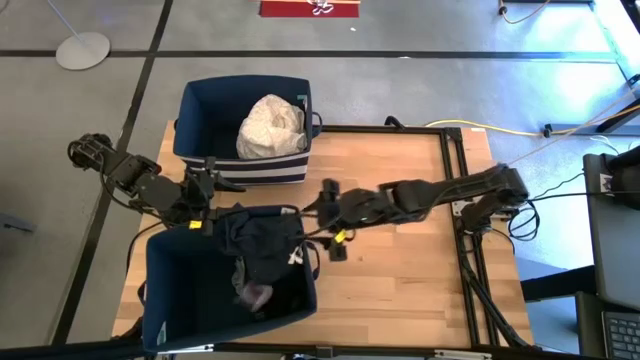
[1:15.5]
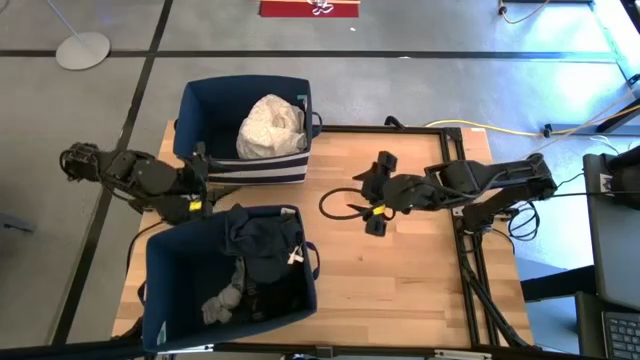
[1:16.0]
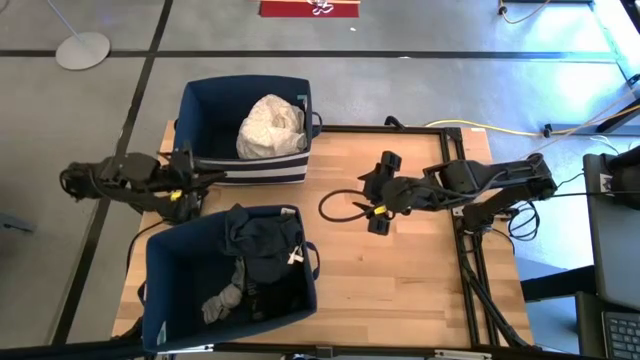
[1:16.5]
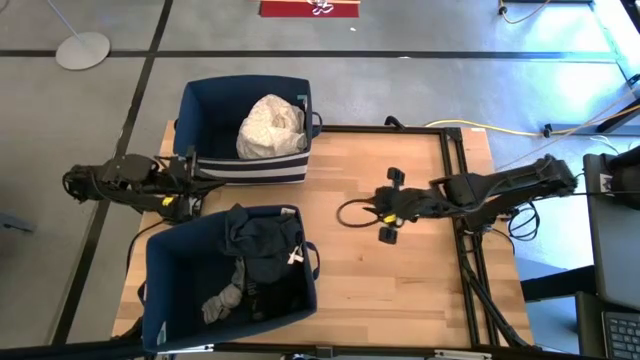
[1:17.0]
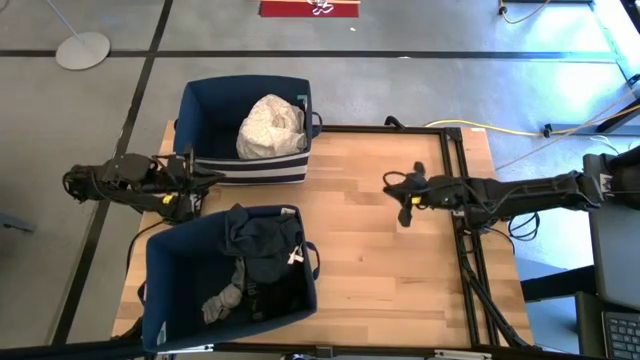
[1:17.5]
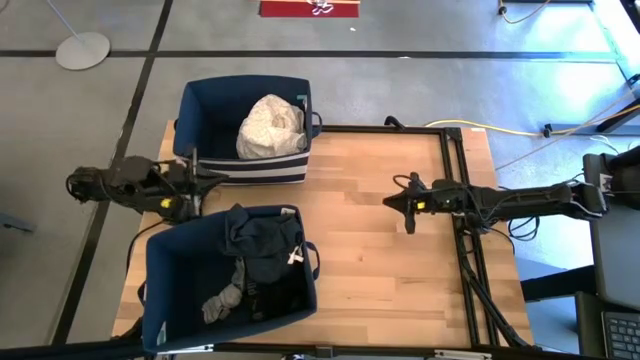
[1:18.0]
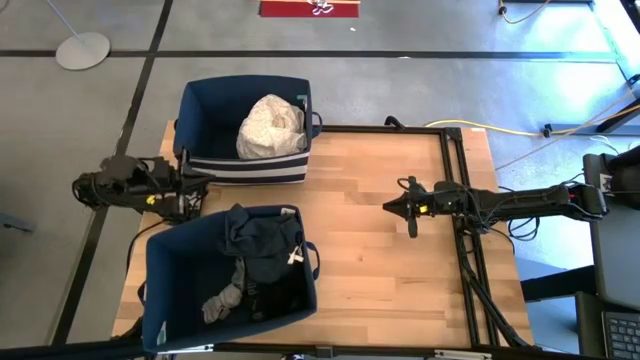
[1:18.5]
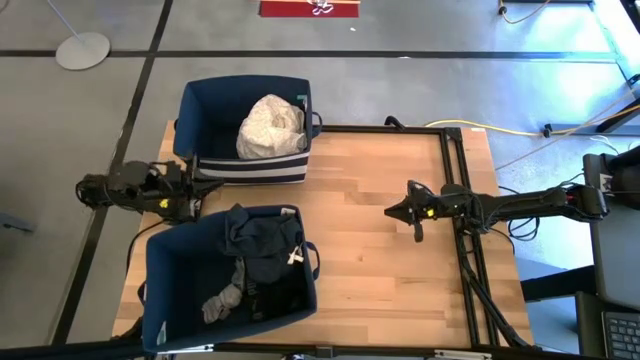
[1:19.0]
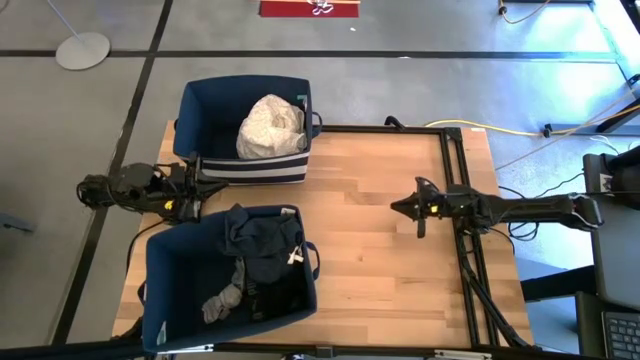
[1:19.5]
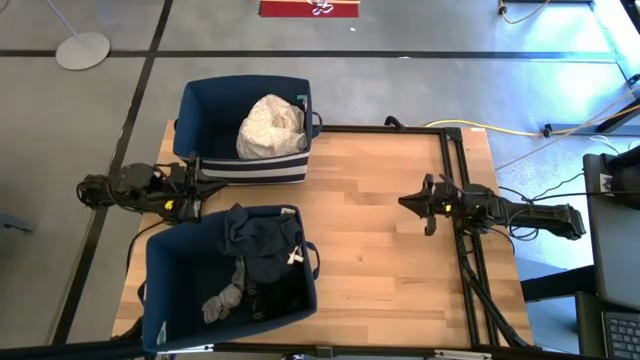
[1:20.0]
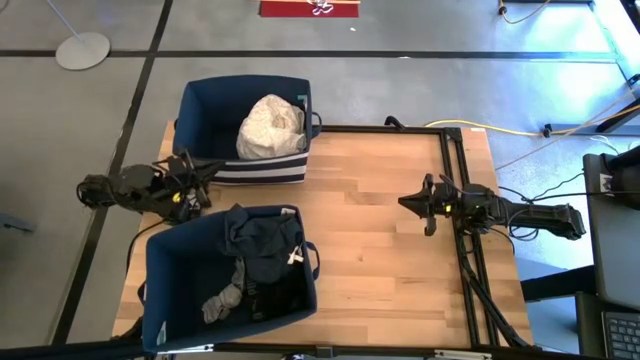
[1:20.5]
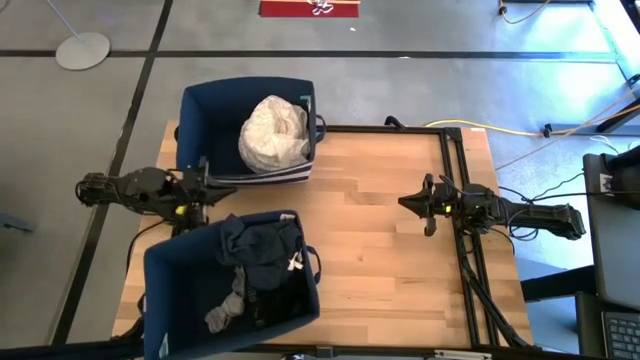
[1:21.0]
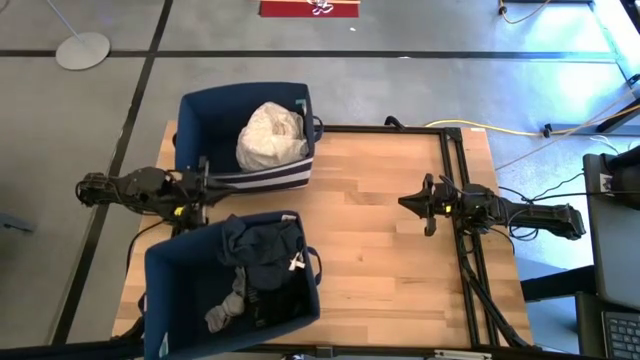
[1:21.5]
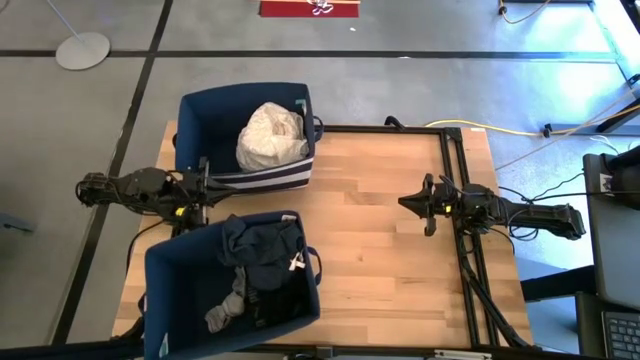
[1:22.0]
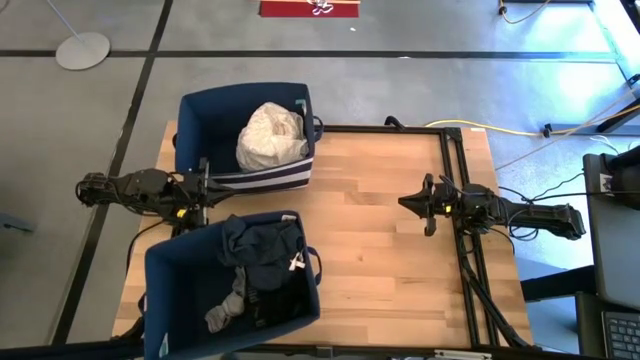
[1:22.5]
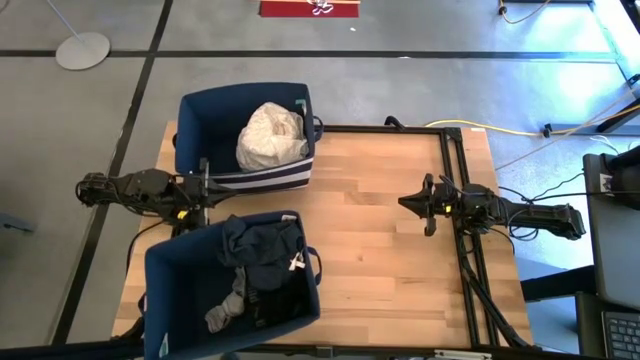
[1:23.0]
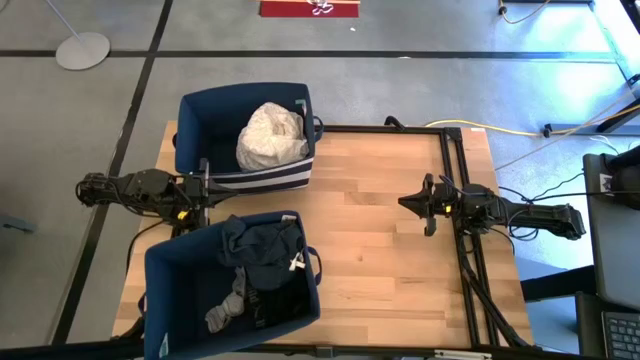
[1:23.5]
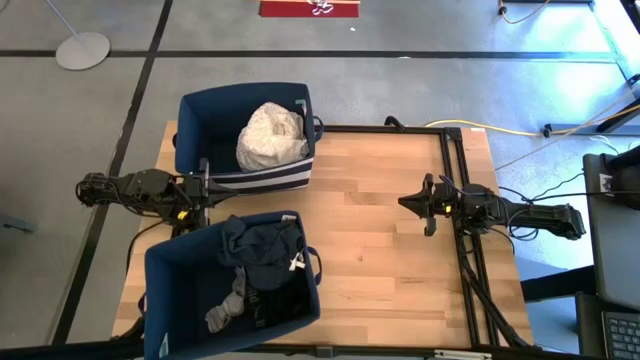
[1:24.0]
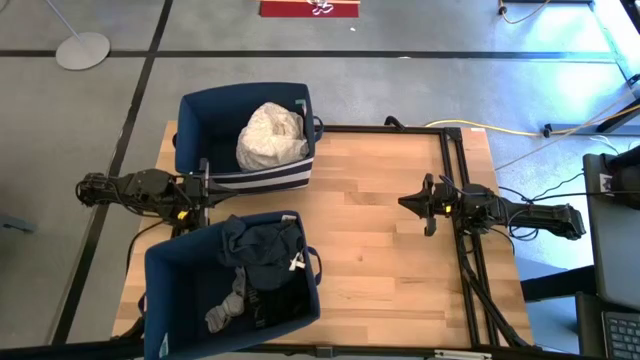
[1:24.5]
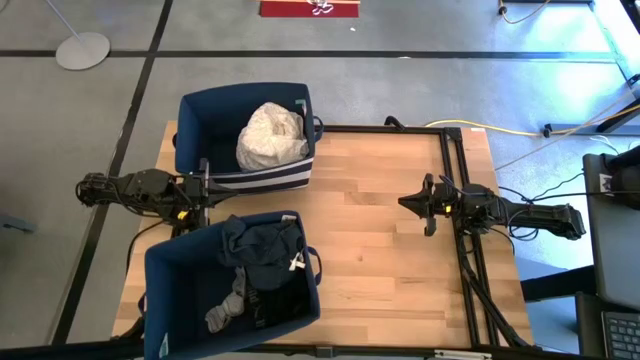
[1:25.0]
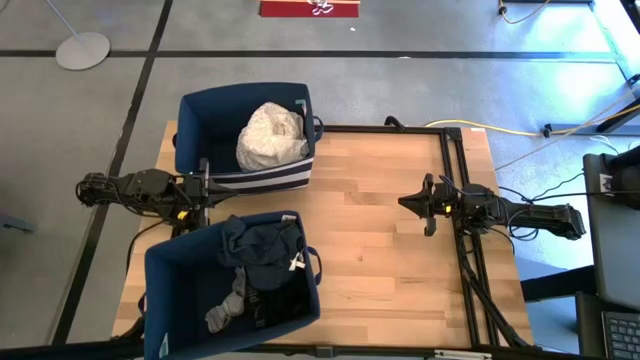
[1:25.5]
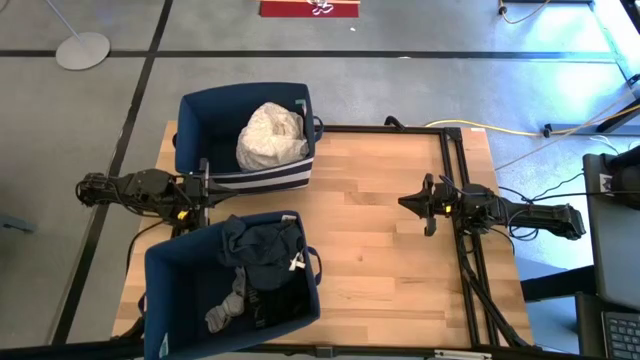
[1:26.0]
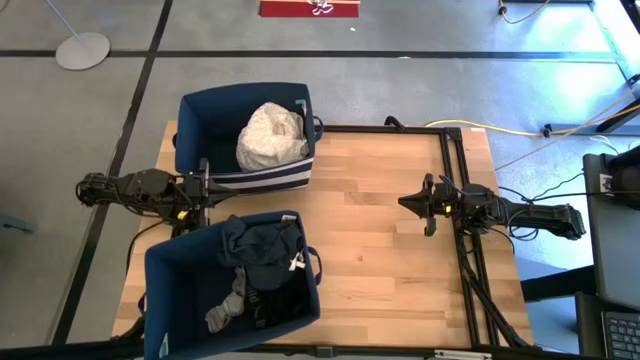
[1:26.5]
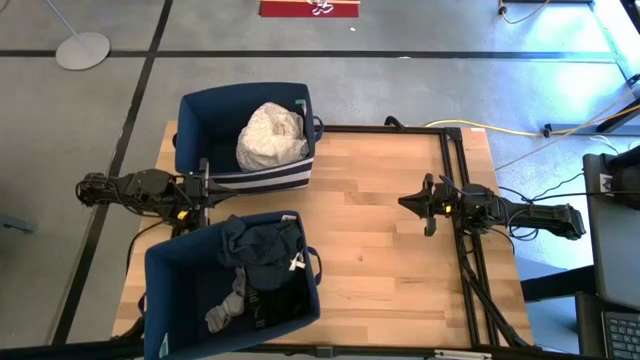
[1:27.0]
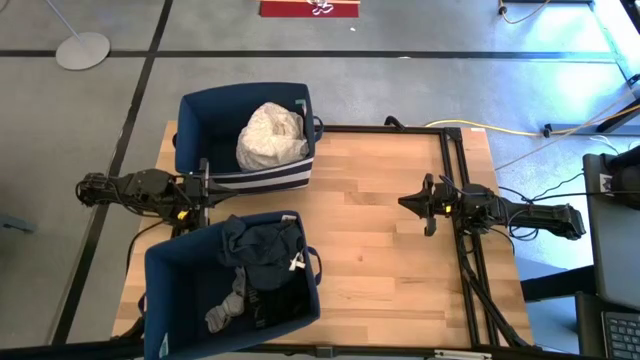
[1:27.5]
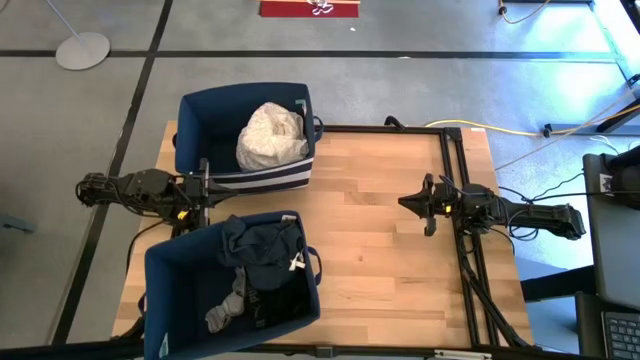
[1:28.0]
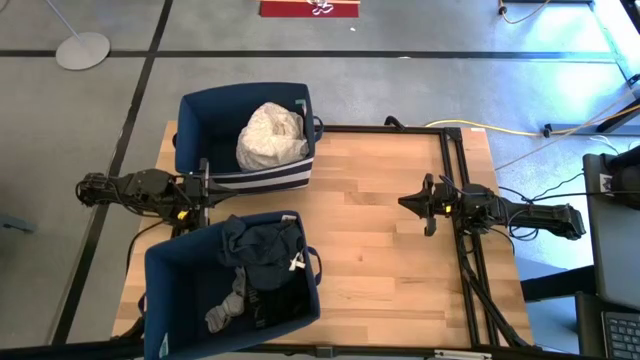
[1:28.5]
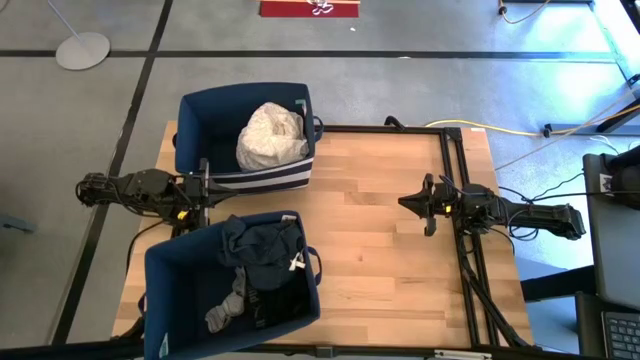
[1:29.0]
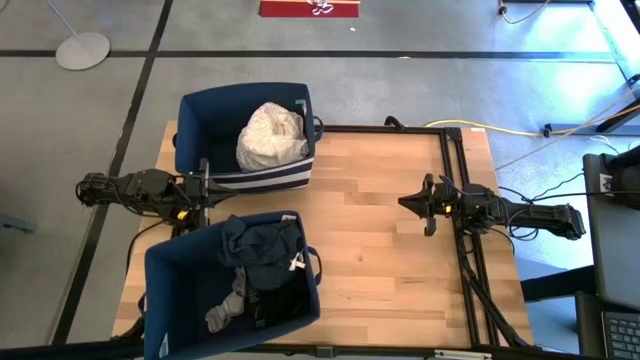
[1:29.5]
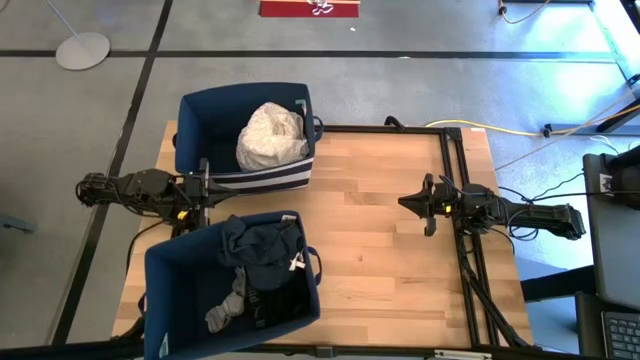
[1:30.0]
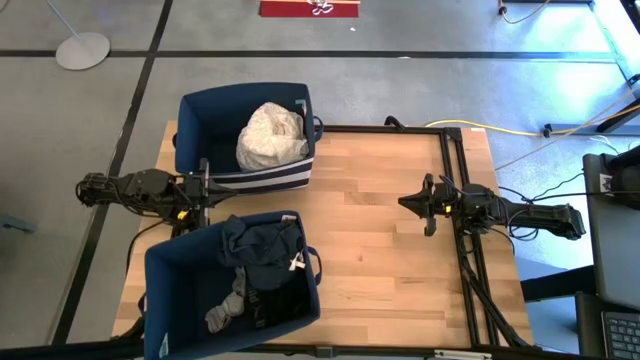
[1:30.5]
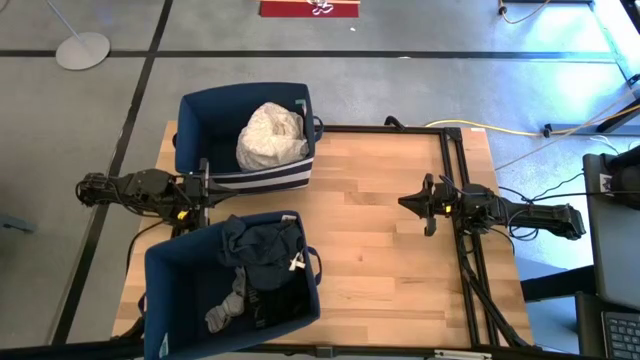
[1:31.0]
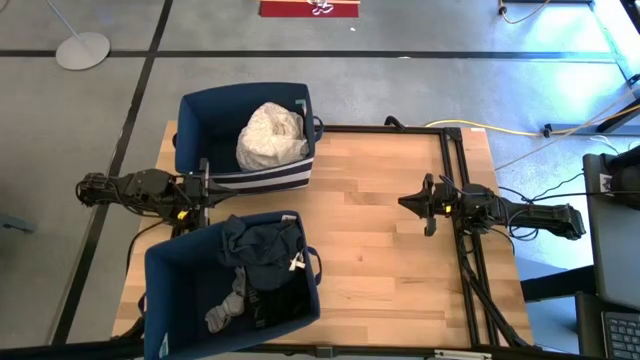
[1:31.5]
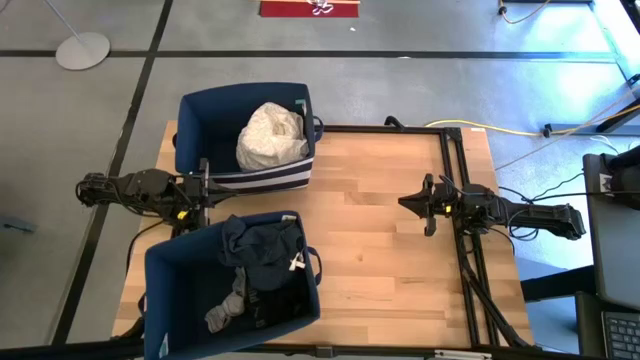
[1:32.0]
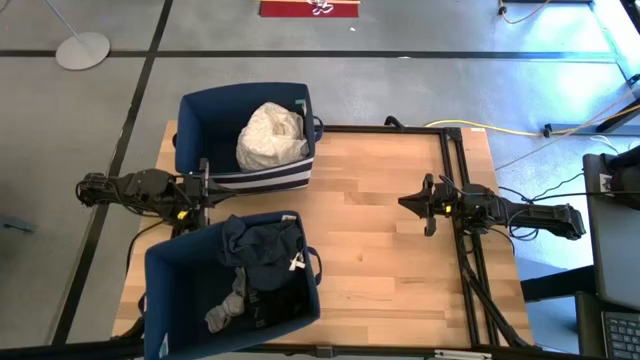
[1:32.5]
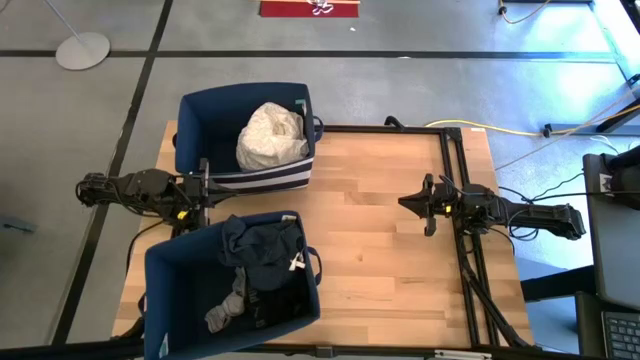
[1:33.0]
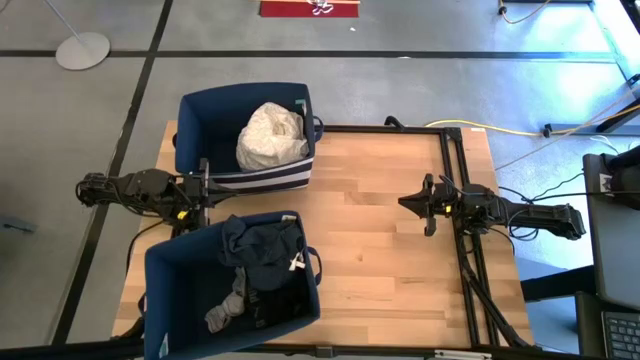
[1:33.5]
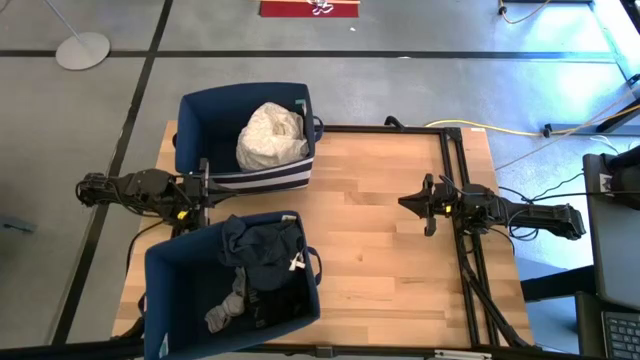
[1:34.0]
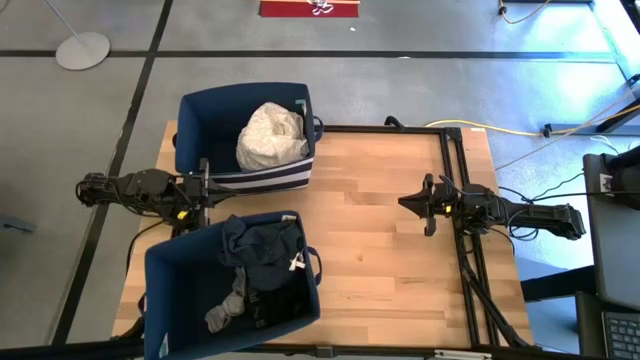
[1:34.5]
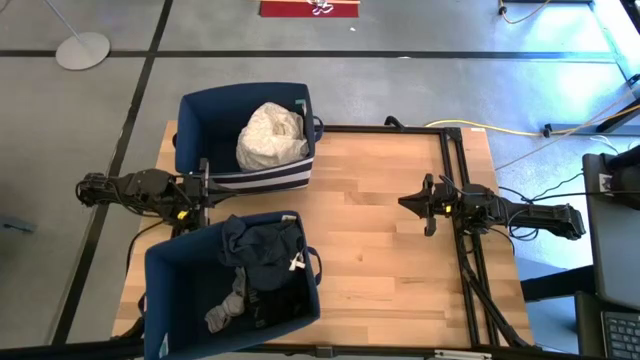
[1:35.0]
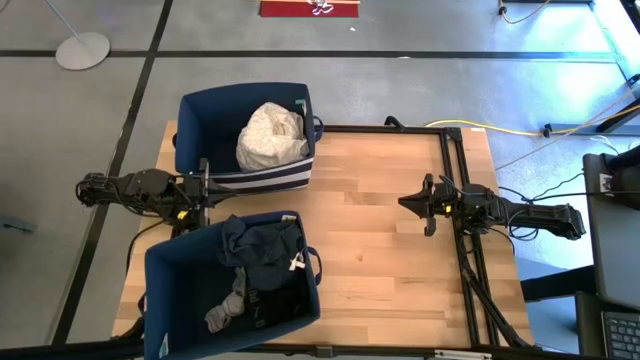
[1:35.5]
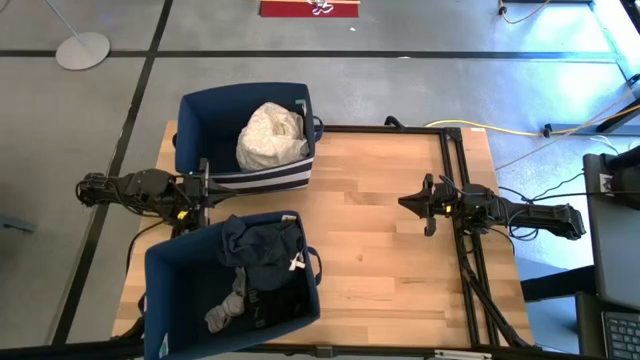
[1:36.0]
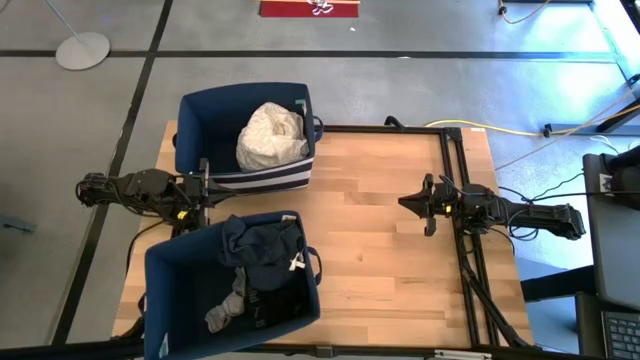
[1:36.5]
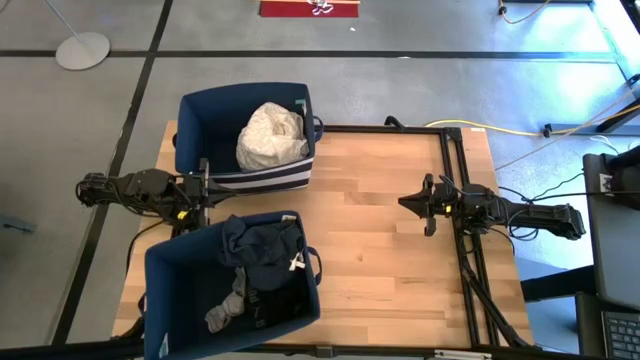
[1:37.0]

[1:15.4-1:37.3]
Task: Sort clothes
Return to Home Position
